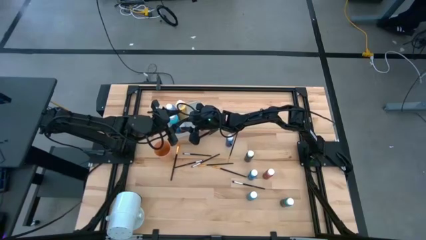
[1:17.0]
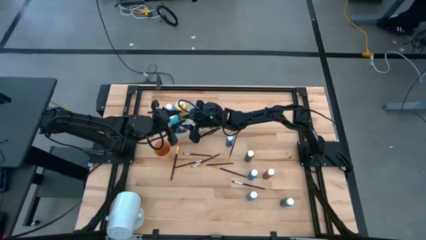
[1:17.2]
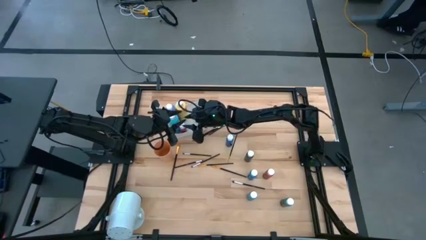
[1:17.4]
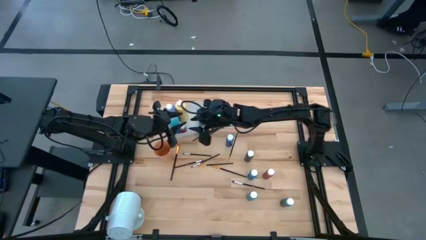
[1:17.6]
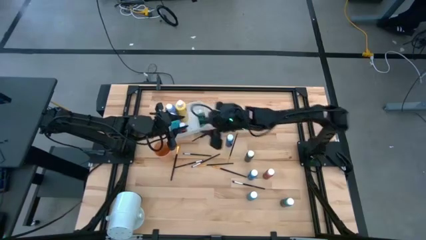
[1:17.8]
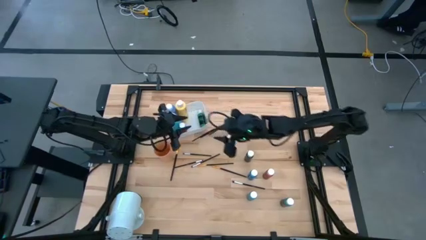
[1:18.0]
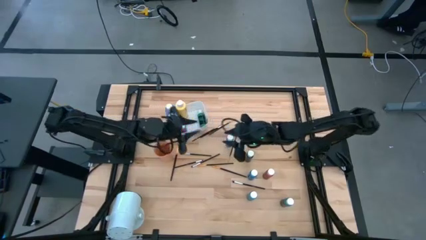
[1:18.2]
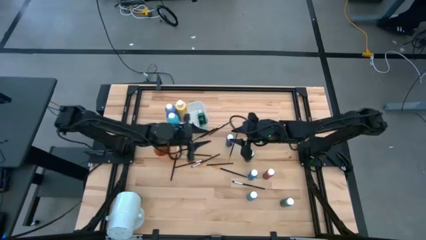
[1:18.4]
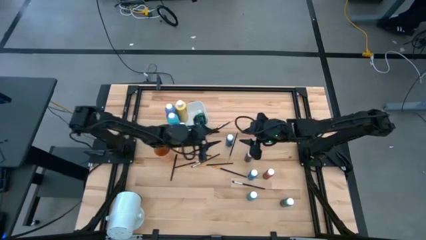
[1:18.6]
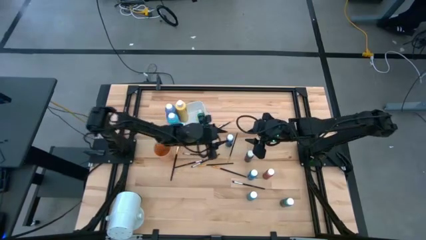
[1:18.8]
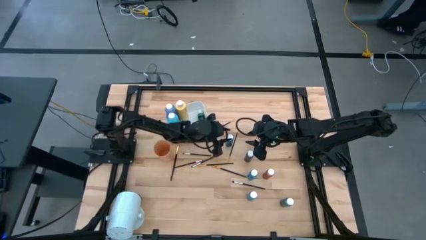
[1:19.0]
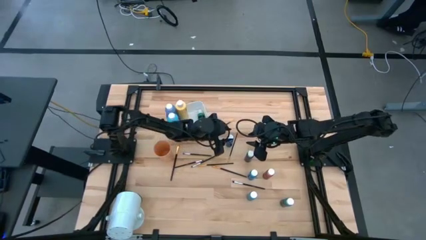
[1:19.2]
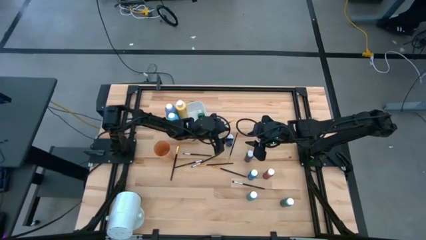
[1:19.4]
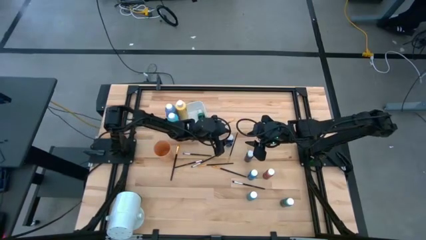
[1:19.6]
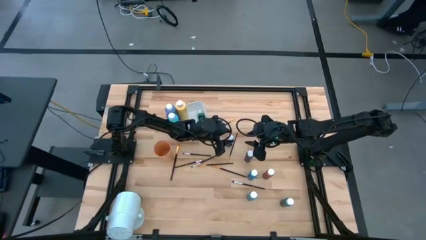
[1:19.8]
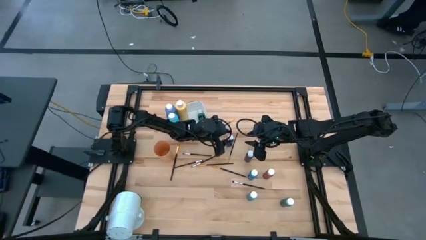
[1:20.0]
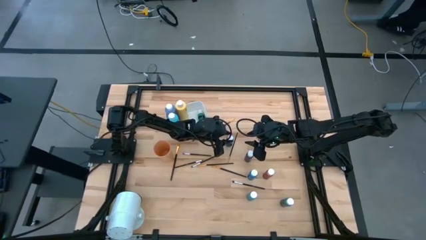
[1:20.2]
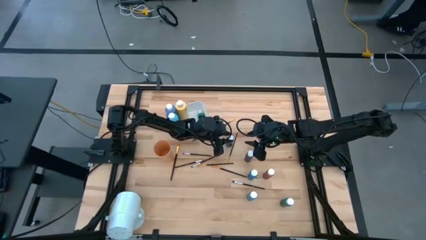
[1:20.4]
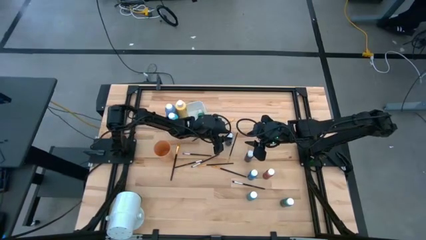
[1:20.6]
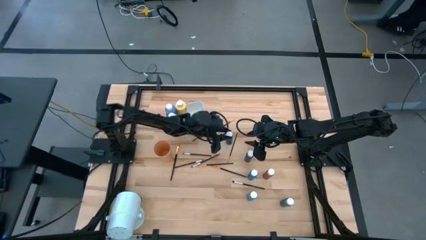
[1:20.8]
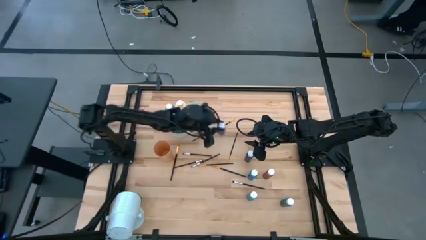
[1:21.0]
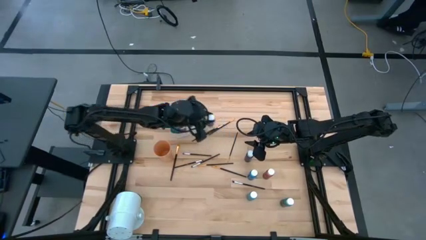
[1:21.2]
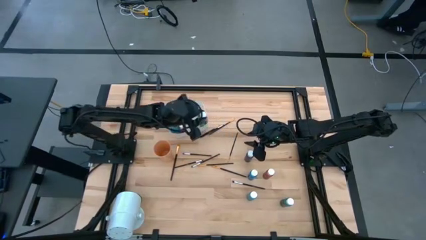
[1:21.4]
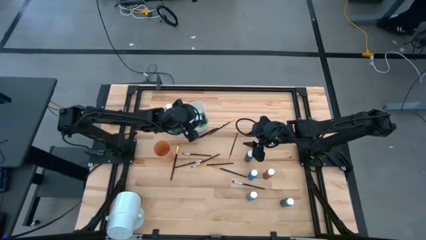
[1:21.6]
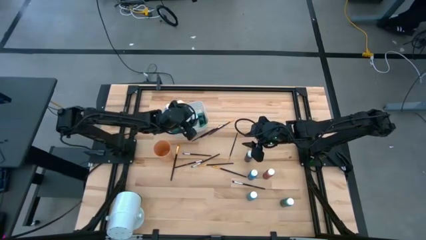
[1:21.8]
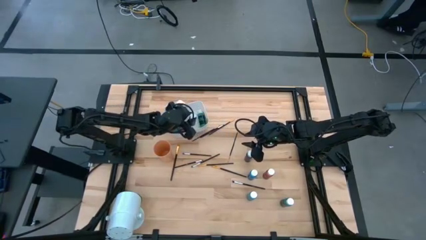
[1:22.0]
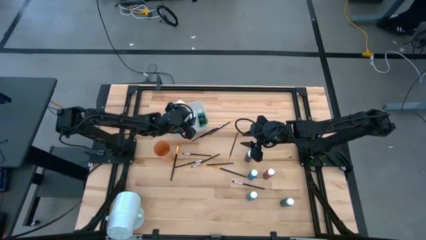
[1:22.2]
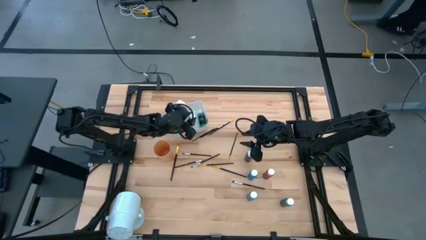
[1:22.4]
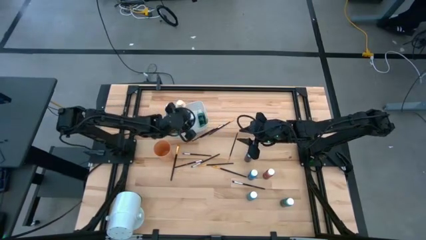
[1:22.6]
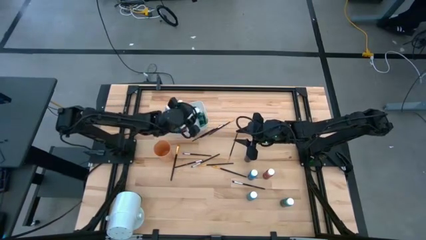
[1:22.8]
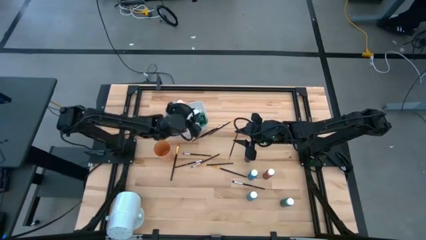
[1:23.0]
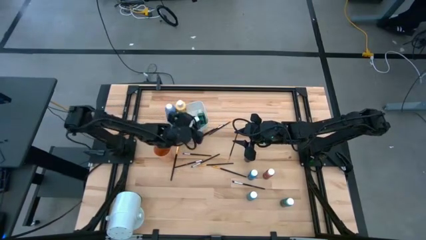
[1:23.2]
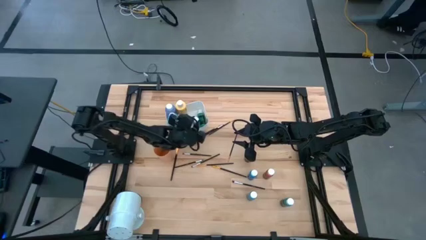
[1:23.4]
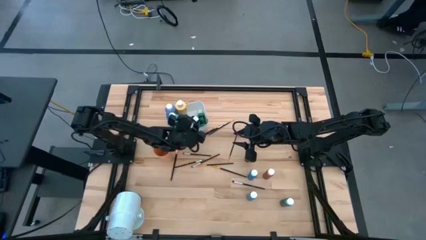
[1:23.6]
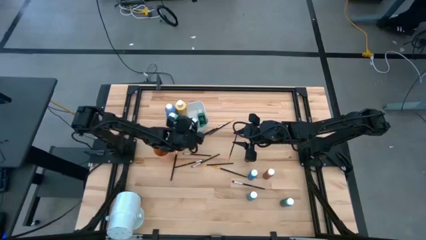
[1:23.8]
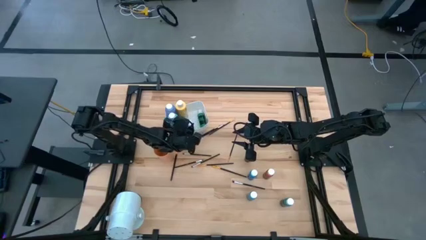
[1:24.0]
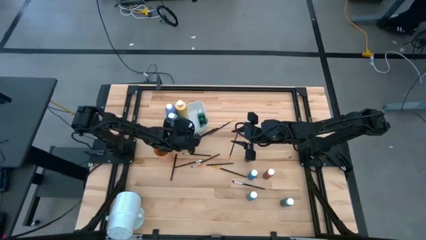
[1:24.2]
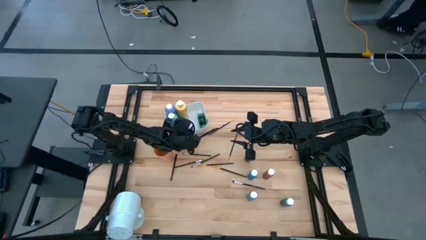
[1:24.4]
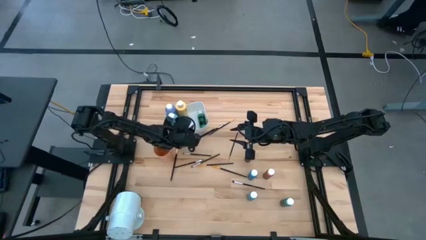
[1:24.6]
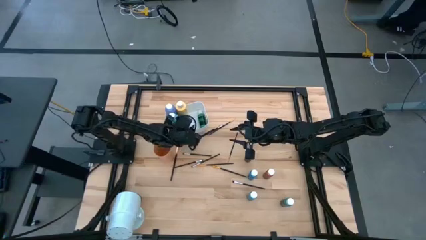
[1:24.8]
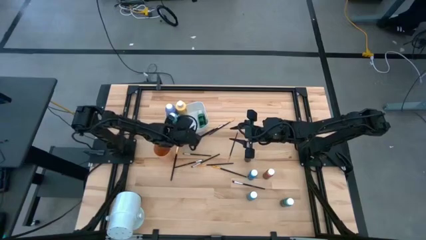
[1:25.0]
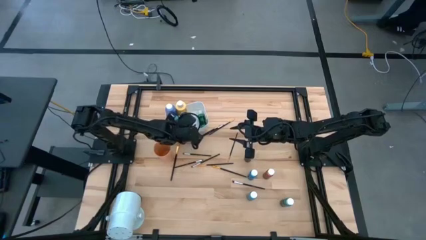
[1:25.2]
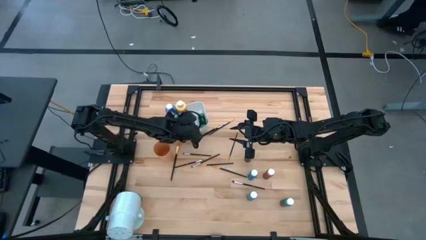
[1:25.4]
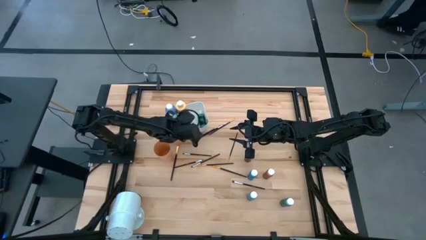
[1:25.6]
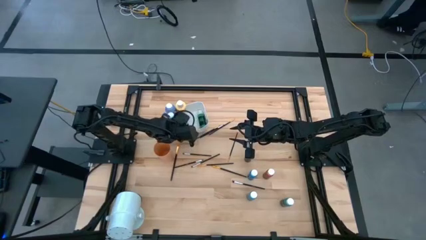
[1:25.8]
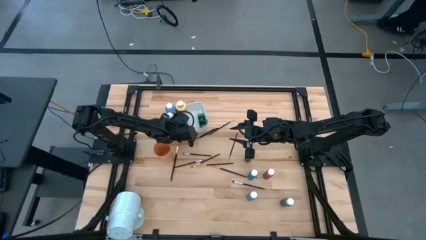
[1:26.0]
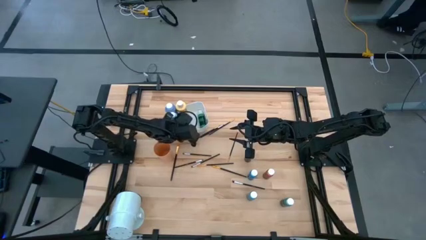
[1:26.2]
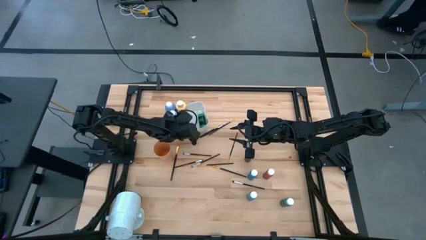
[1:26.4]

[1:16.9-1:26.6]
Task: Pick & Place Paint Supplies
Put the top small blue paint bottle into the white bin

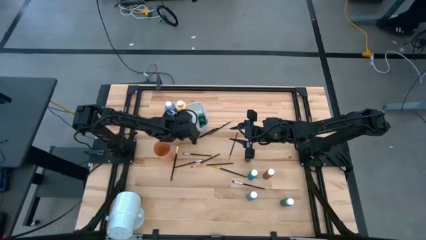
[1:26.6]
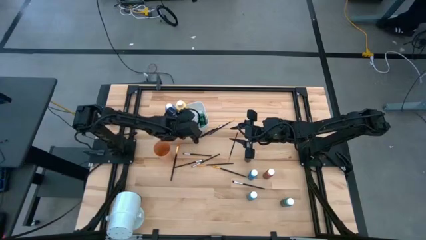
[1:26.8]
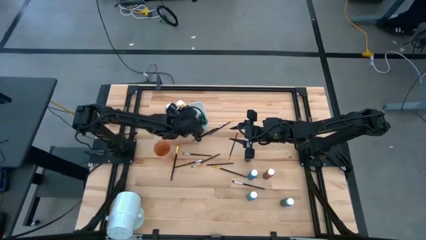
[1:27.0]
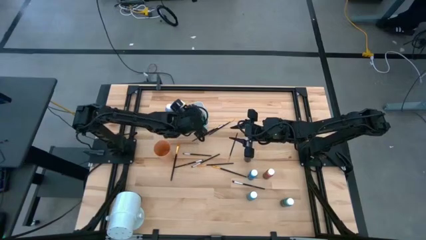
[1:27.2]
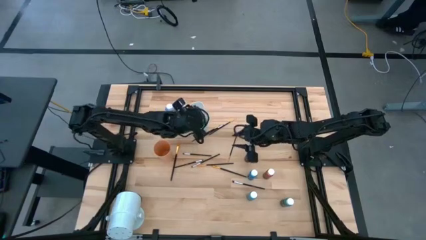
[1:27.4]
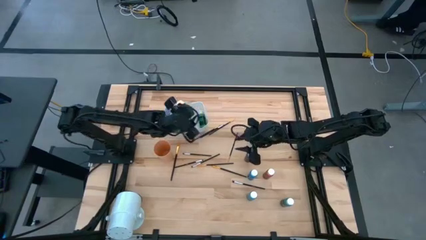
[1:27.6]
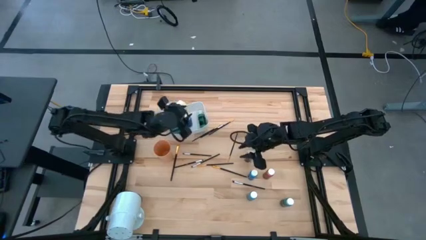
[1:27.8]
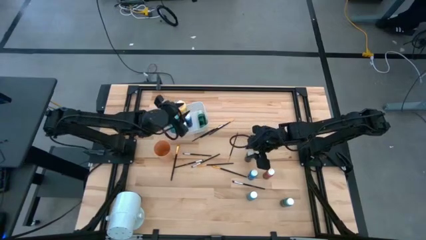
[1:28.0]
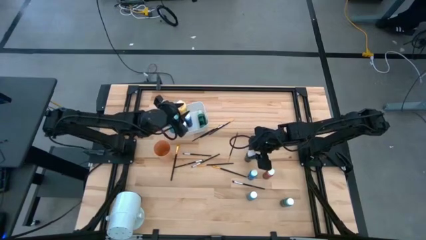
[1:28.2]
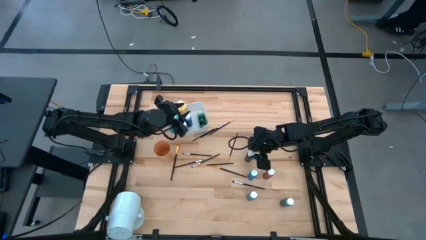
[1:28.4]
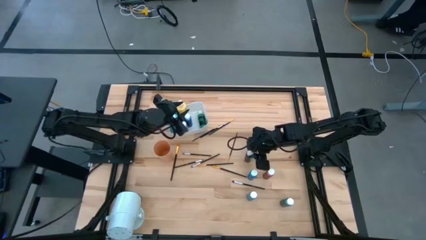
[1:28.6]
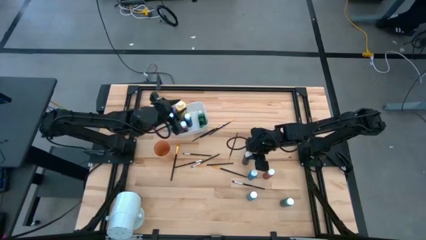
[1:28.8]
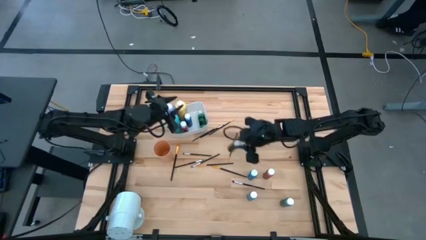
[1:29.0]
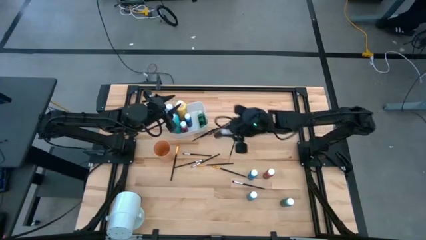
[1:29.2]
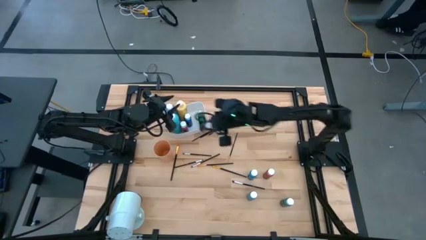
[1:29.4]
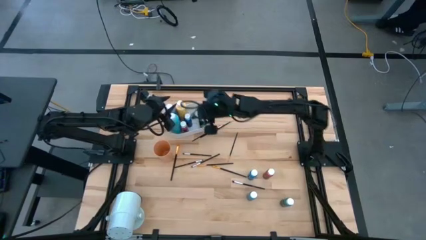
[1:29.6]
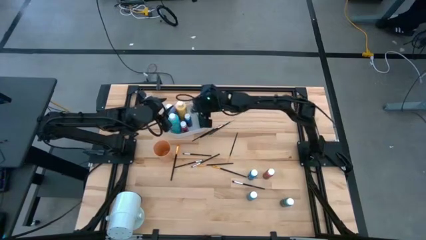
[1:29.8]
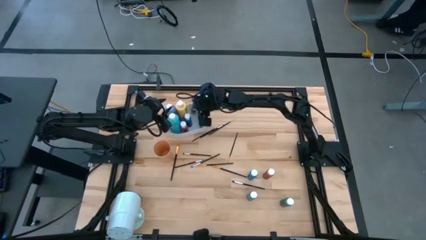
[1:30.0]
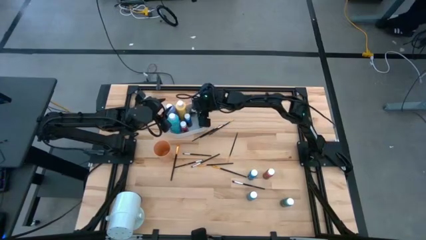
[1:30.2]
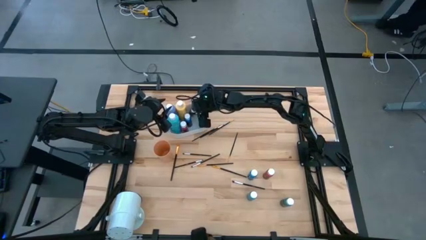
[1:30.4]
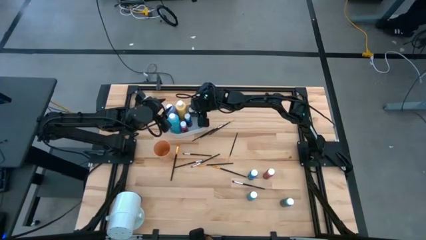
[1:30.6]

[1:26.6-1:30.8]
Put the black silver paint bottle into the white bin

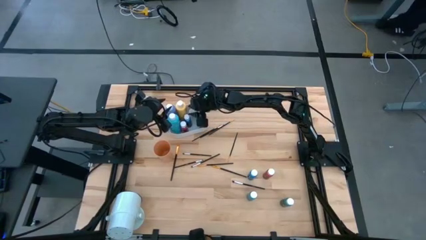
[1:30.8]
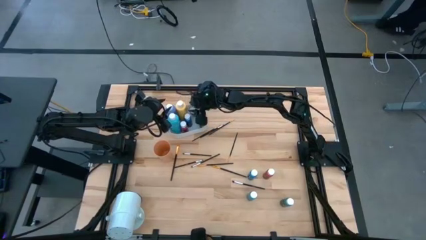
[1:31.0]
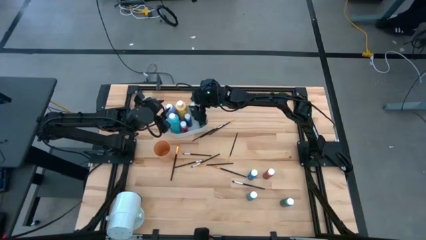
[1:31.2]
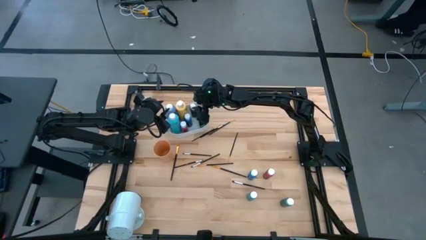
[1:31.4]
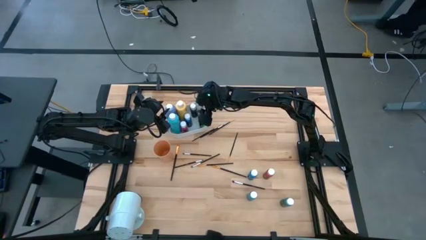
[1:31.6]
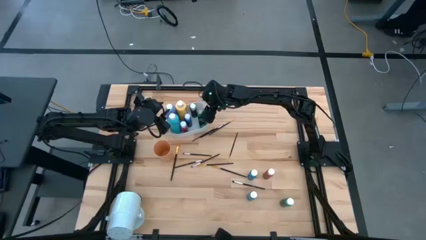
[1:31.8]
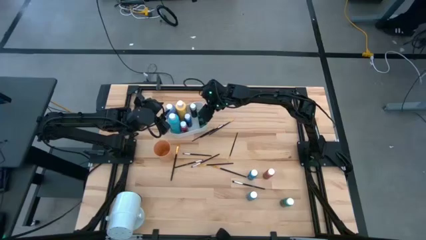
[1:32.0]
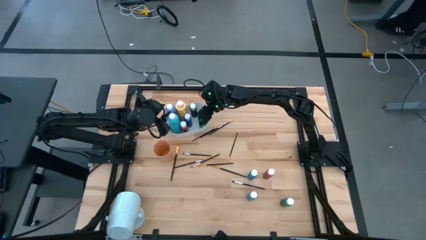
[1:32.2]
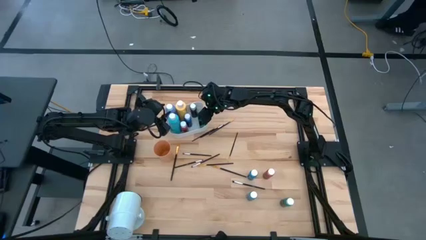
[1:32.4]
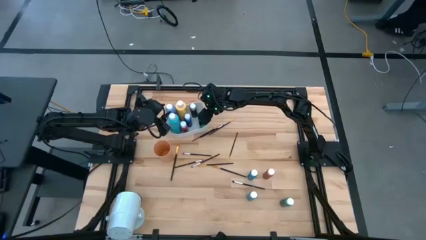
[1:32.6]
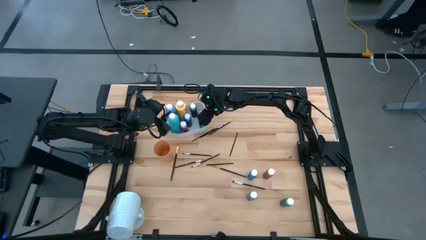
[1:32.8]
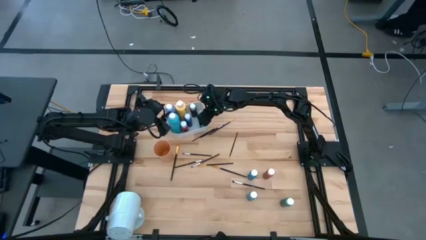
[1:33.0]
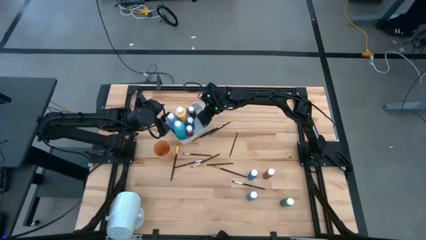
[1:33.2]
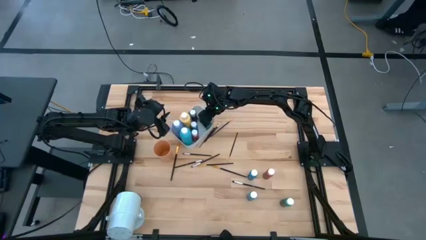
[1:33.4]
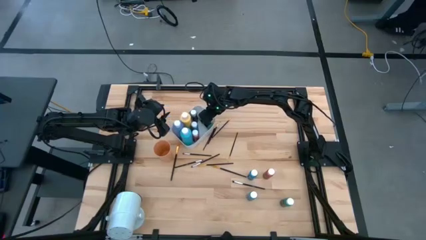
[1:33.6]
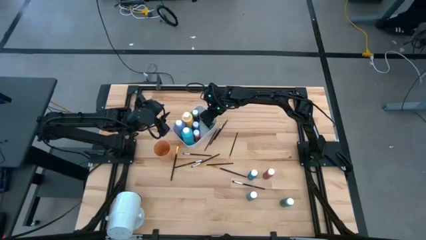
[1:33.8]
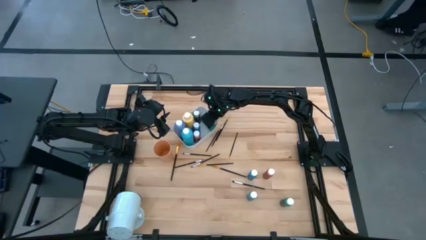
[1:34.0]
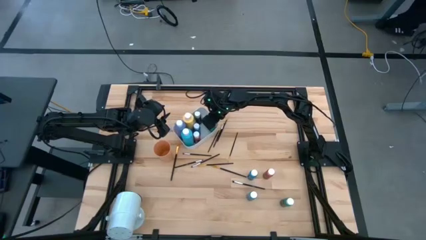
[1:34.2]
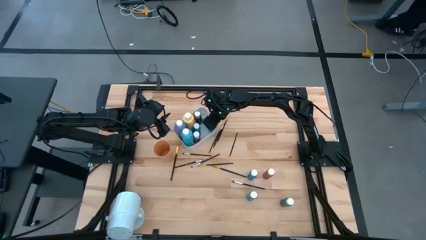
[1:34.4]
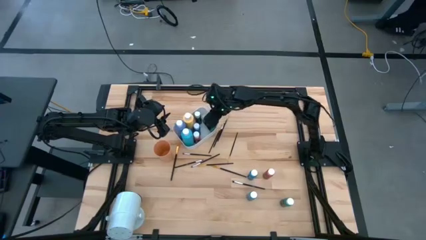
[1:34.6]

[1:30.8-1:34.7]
Adjust the white bin
